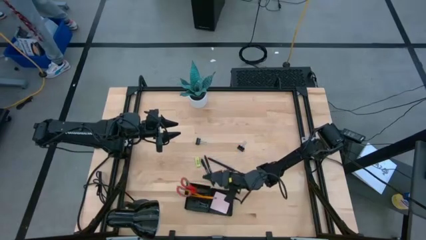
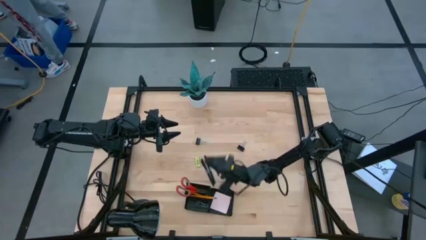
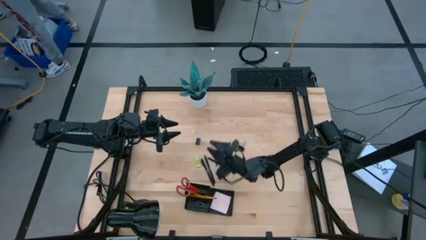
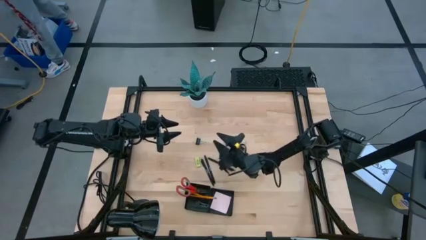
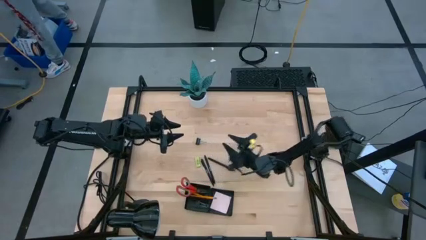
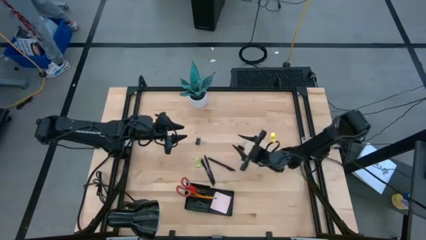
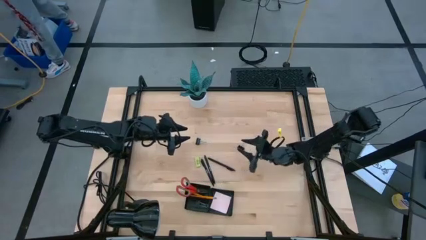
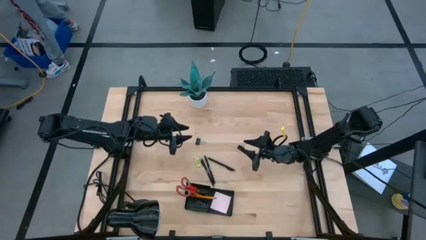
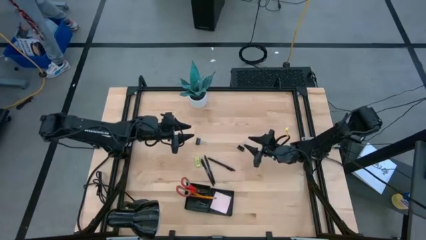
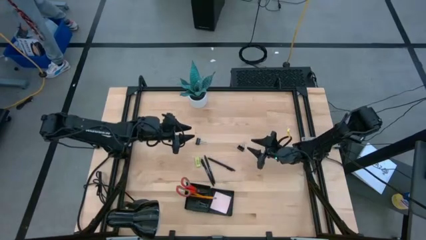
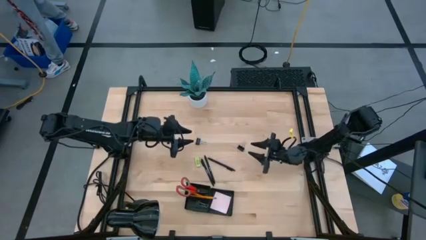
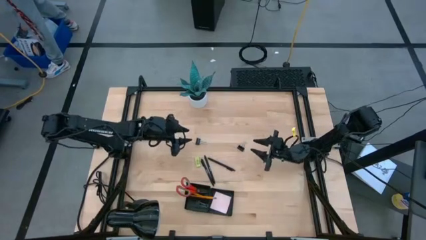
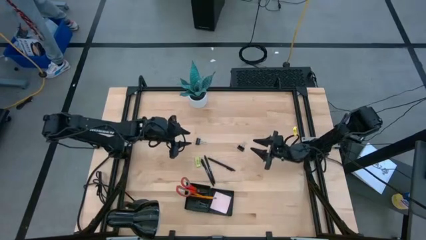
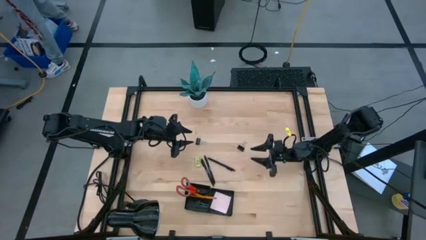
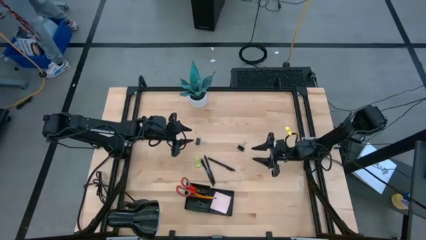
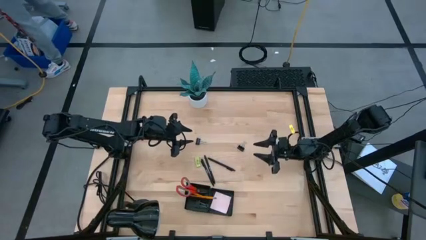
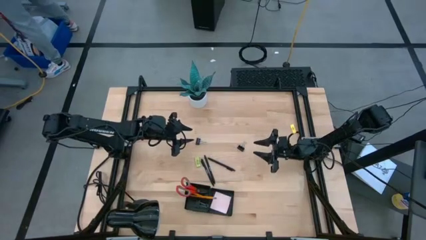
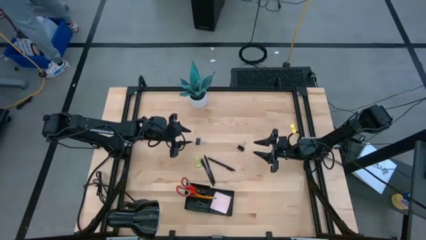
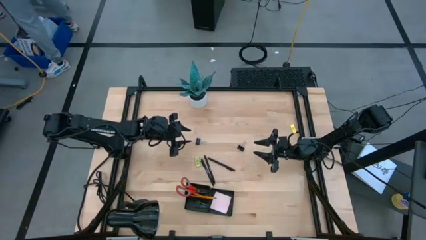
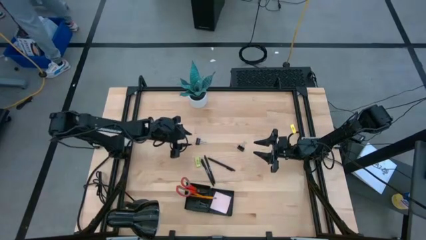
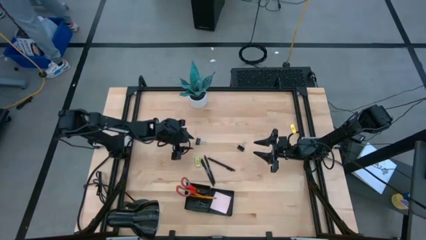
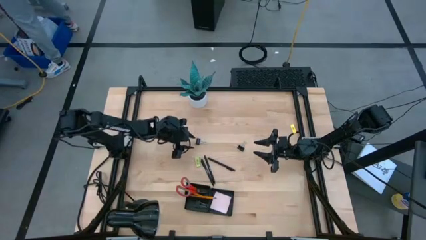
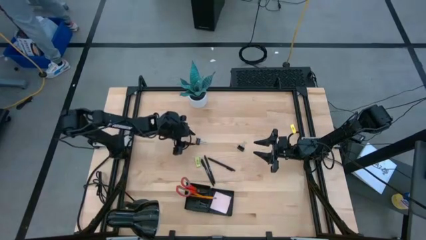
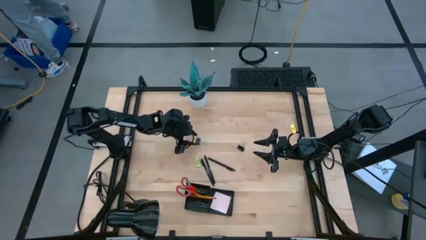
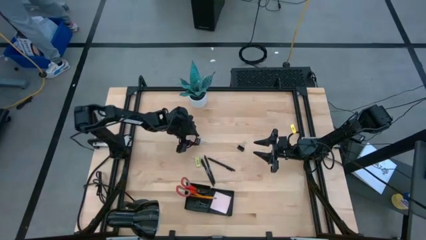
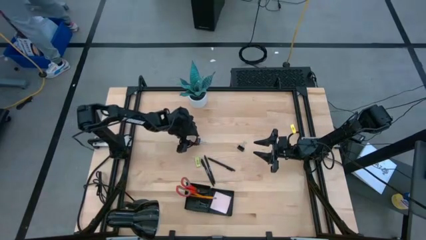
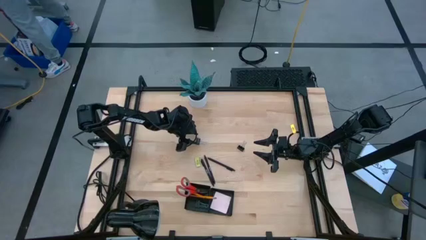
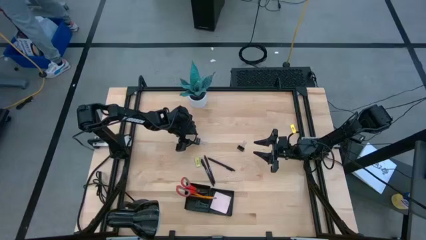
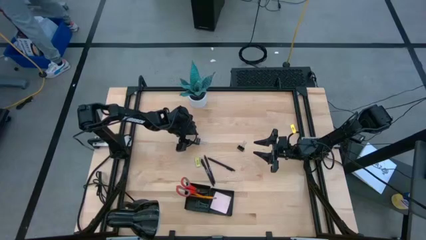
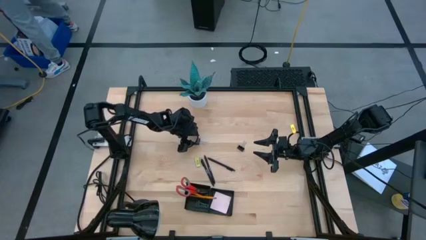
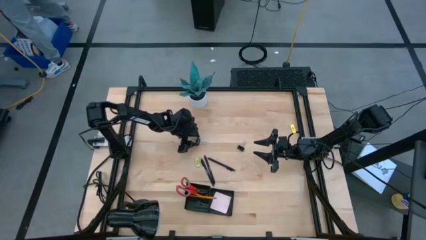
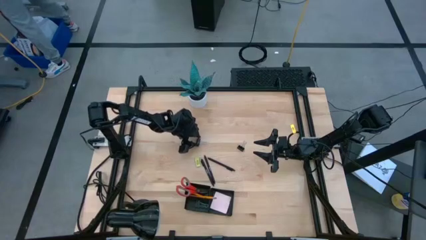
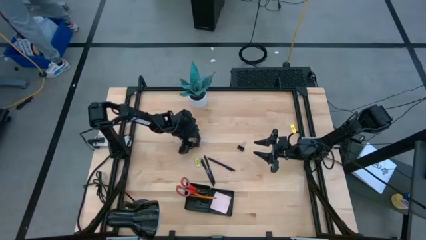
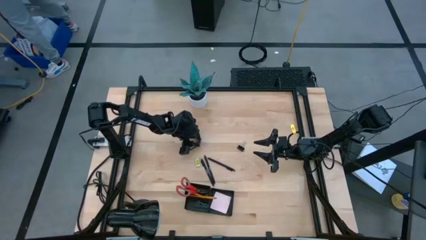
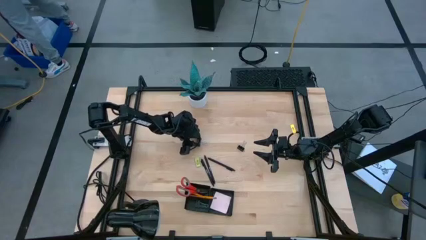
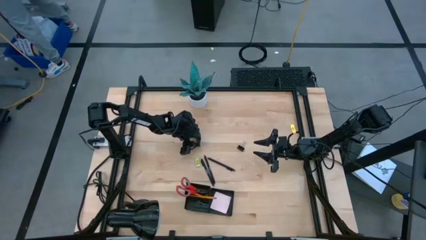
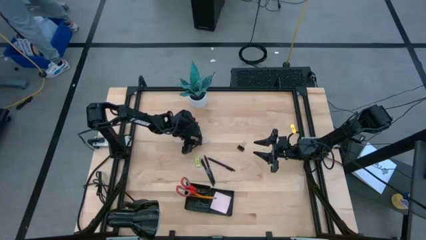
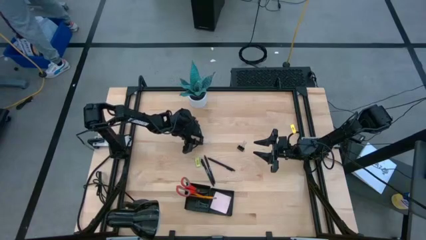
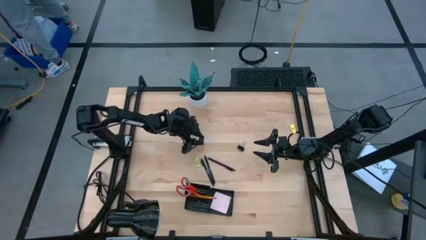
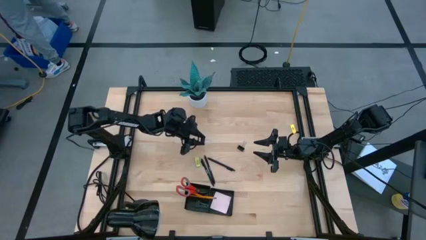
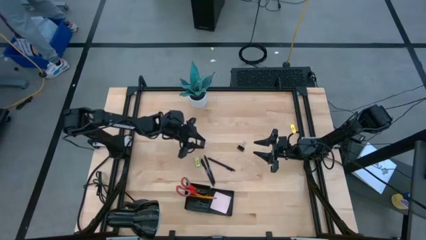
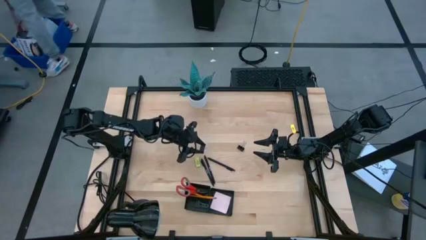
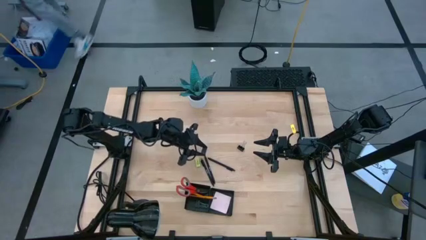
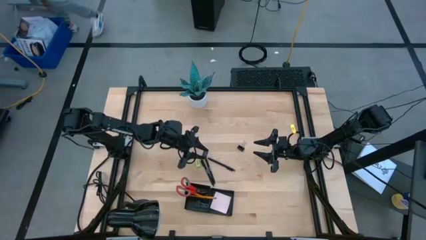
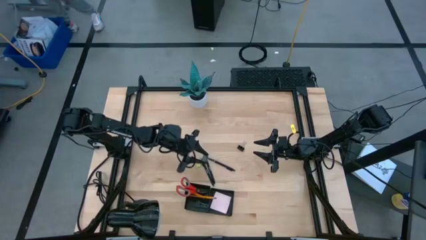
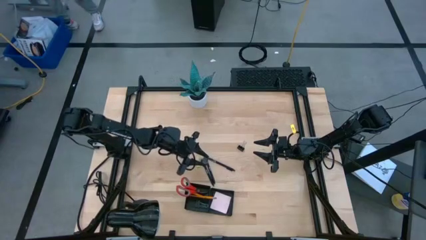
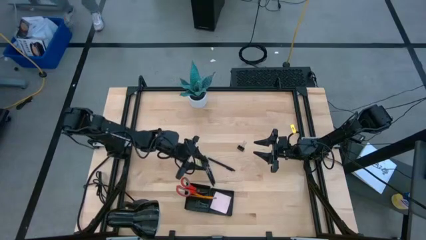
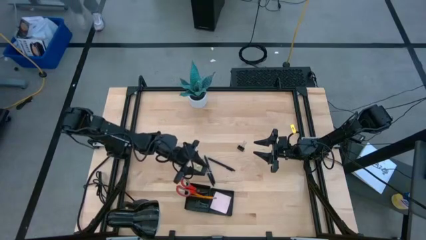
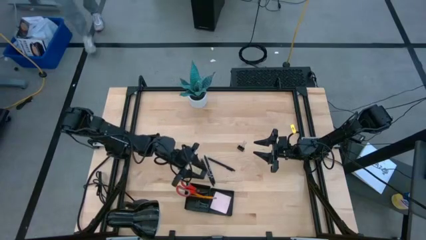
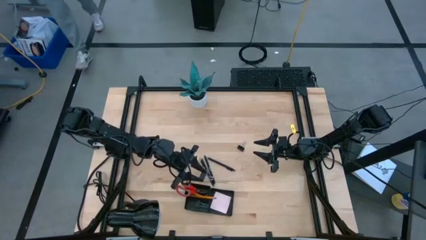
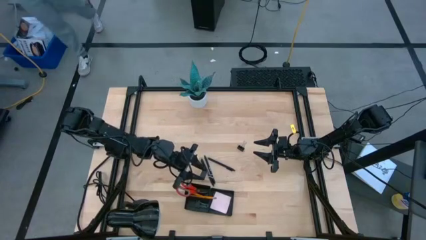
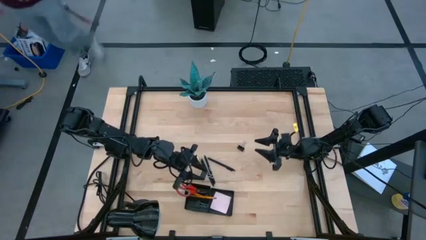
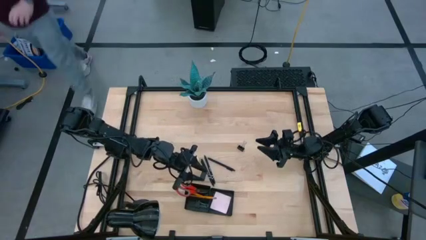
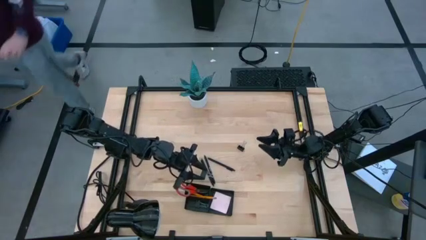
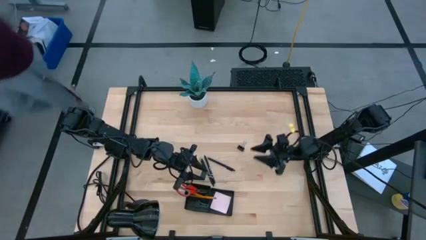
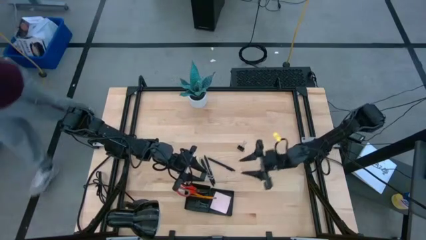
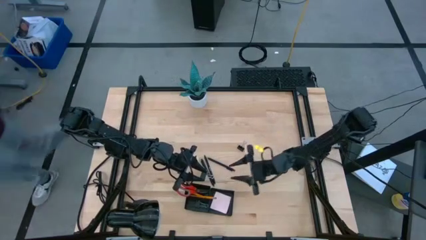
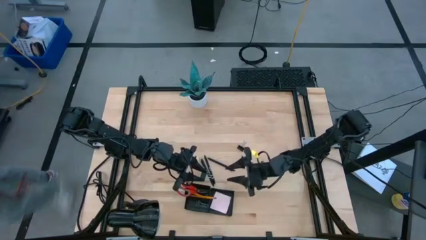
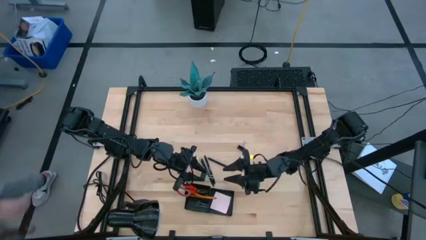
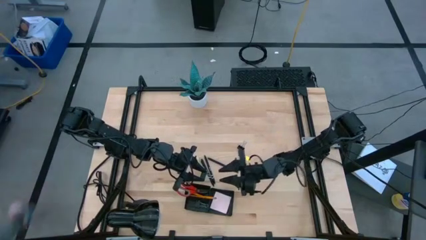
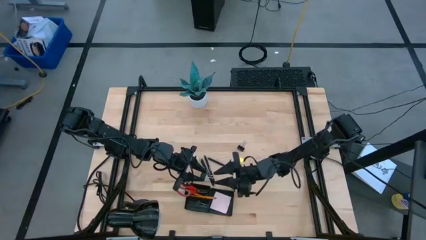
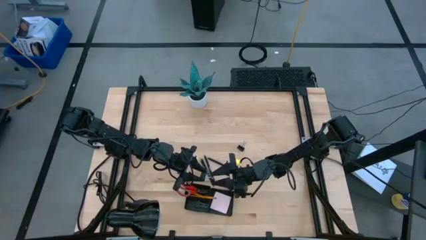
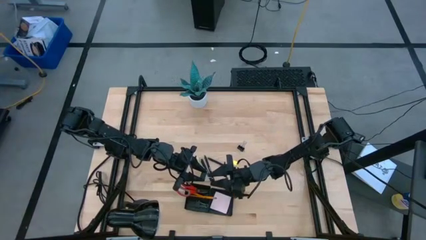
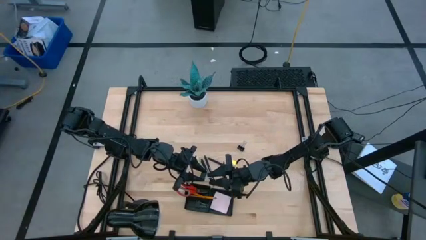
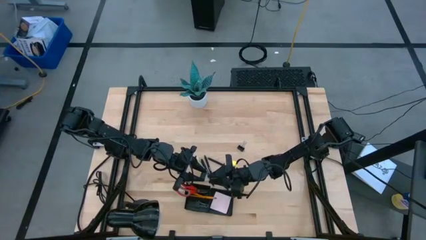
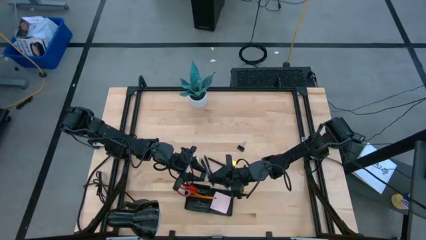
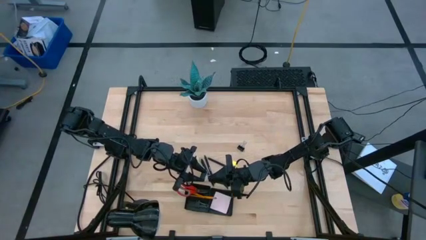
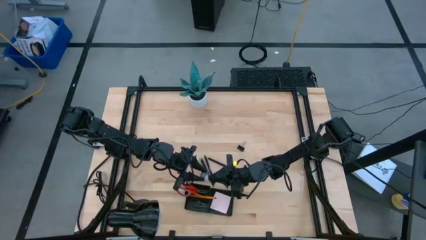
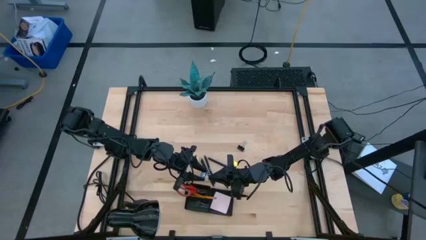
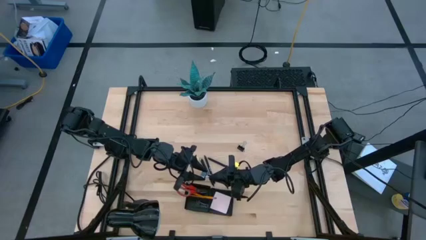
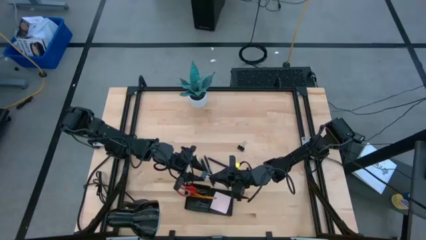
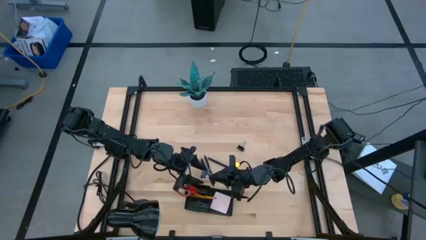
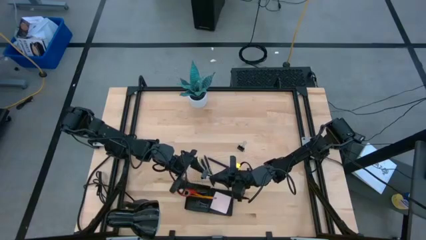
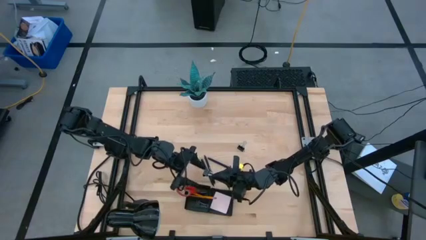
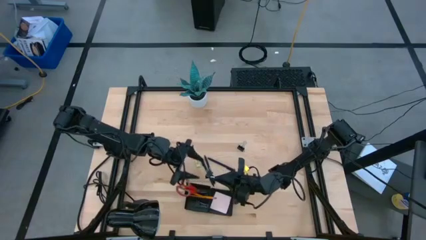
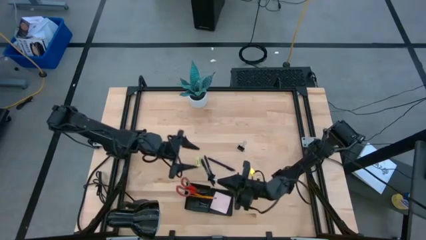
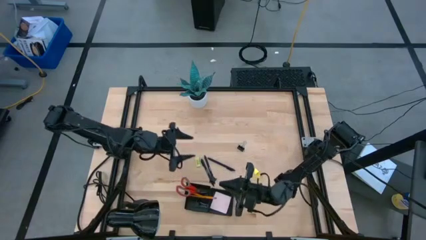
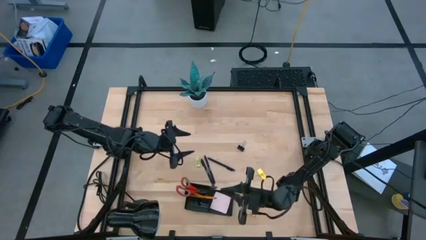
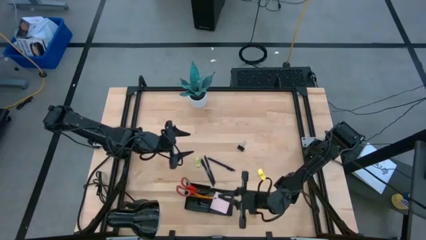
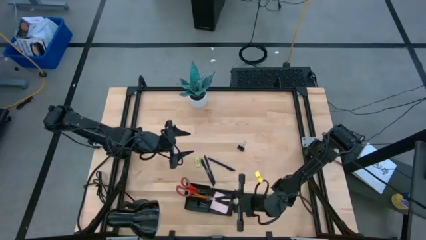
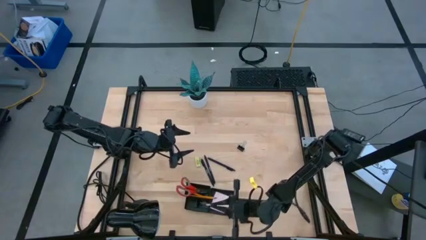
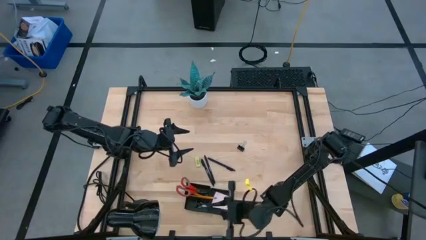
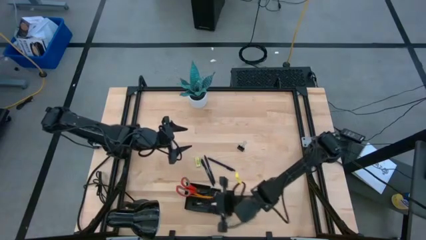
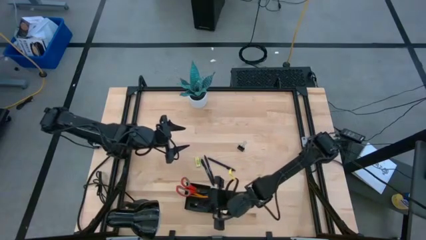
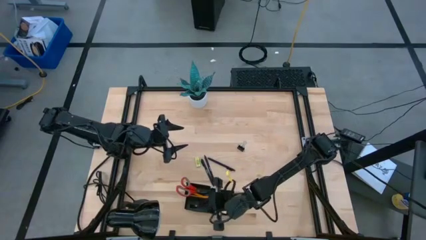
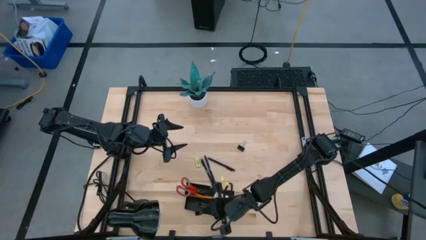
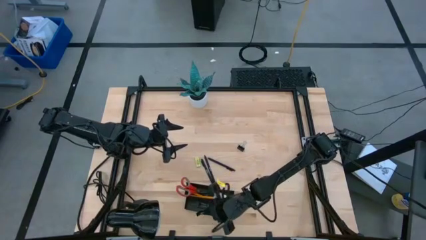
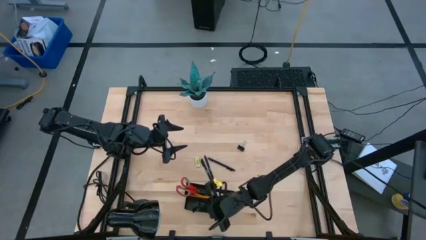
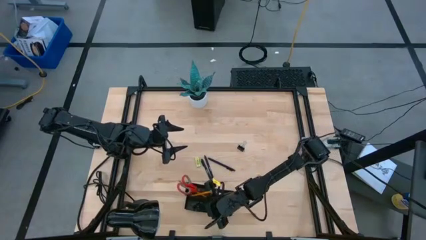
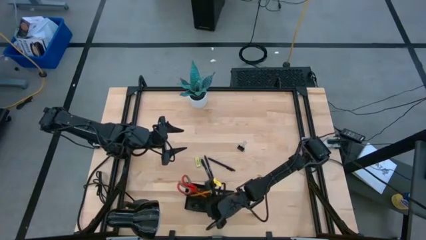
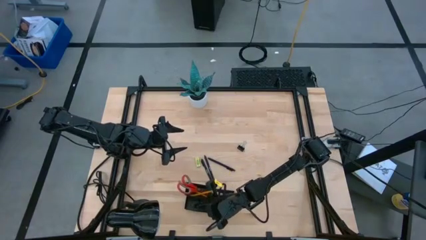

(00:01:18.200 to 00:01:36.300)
Task: Pick and place office supplies into organizer
Put the black binder clip into the black desk organizer
